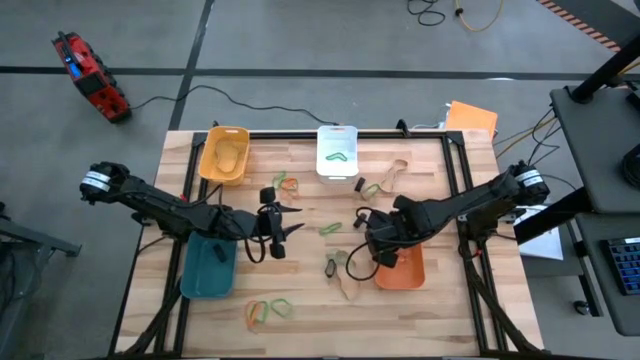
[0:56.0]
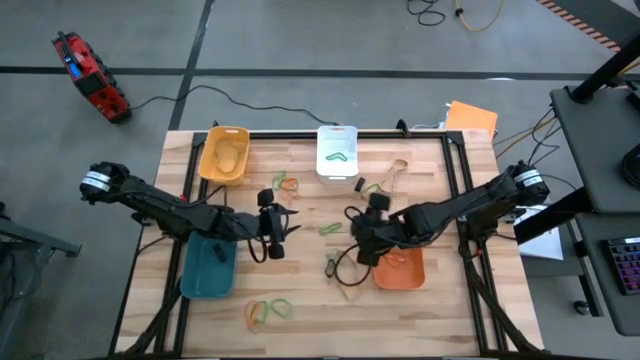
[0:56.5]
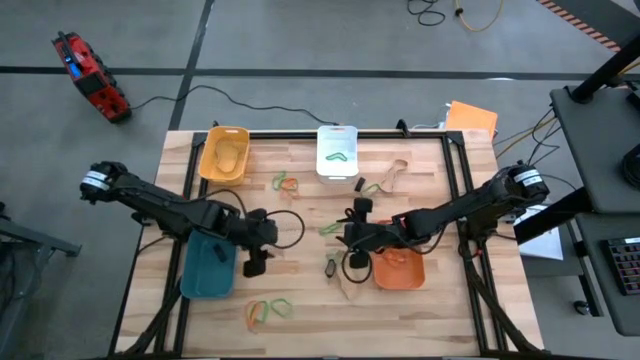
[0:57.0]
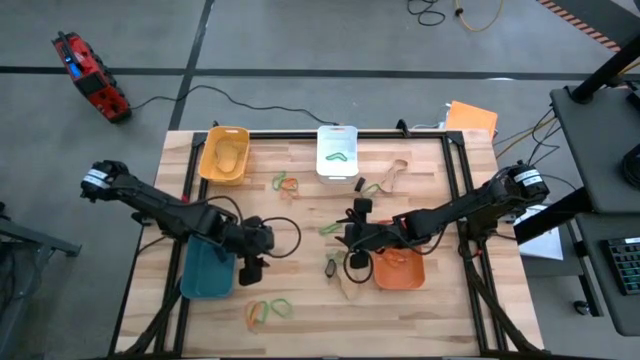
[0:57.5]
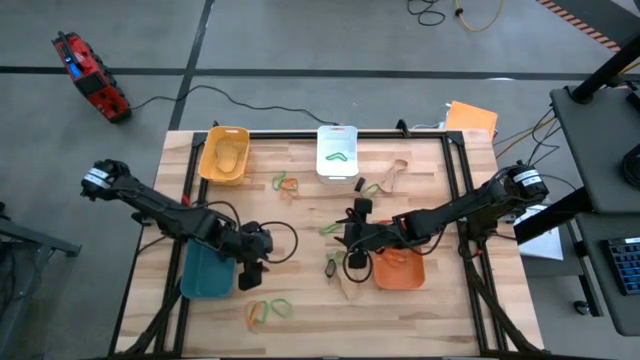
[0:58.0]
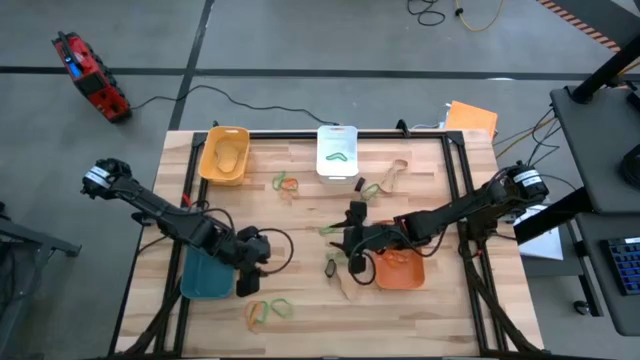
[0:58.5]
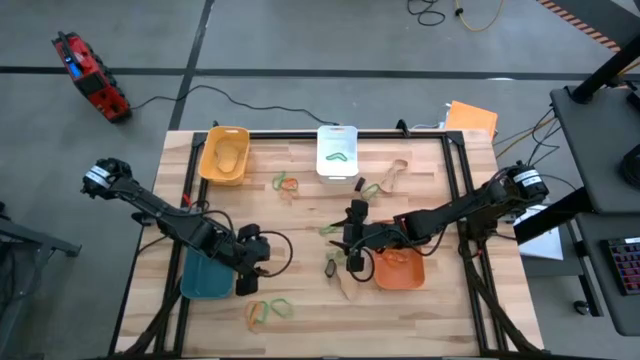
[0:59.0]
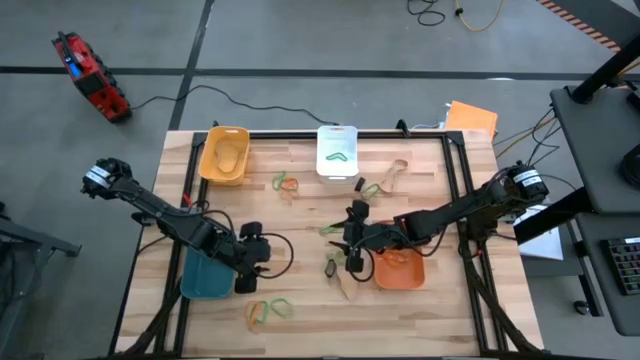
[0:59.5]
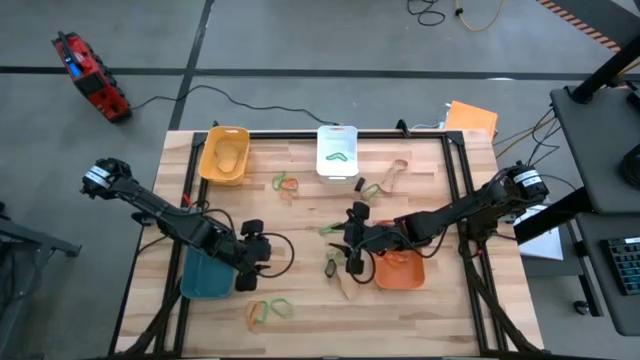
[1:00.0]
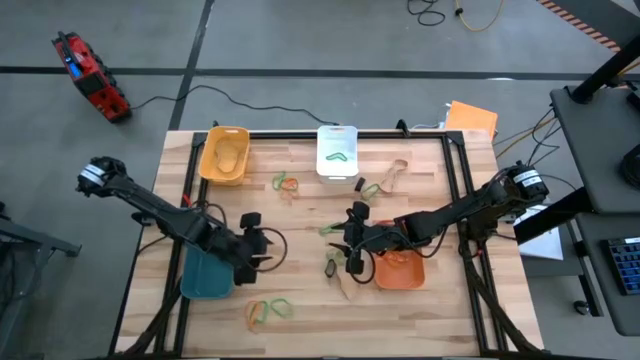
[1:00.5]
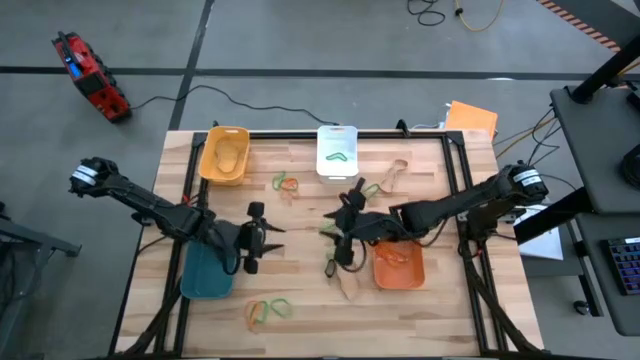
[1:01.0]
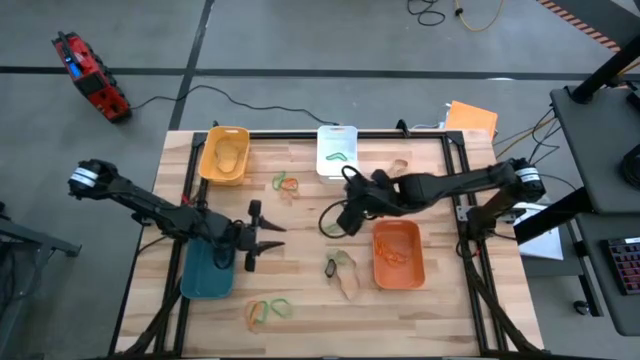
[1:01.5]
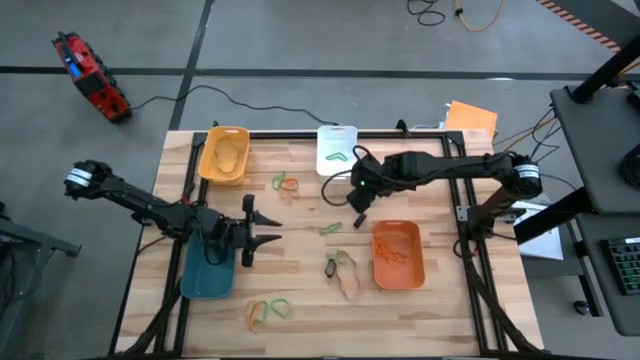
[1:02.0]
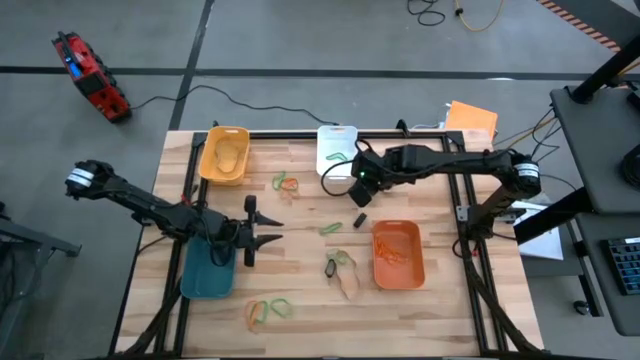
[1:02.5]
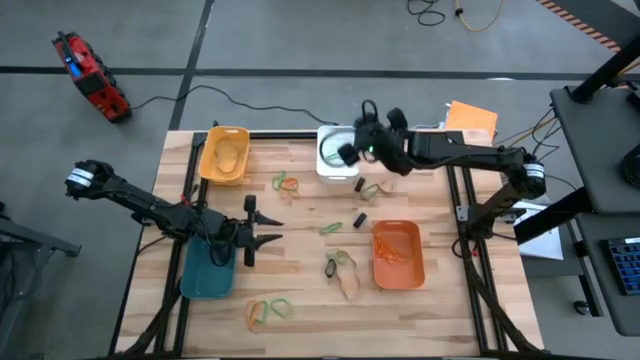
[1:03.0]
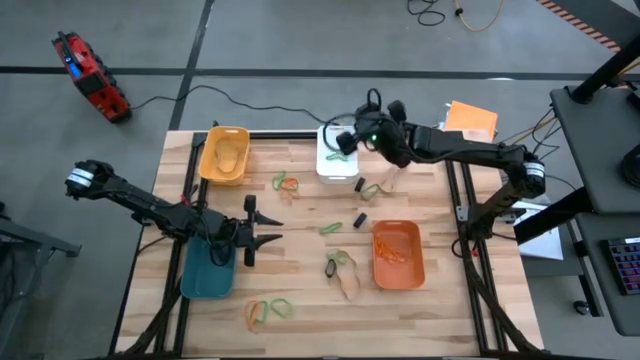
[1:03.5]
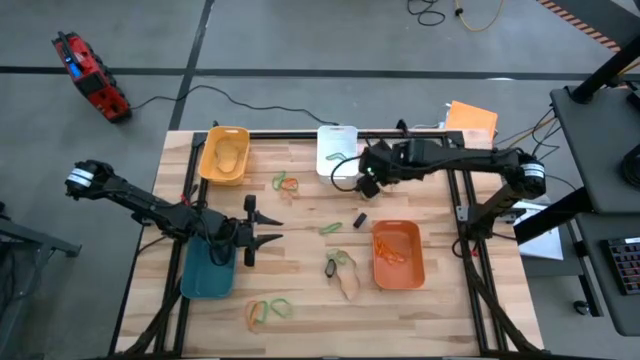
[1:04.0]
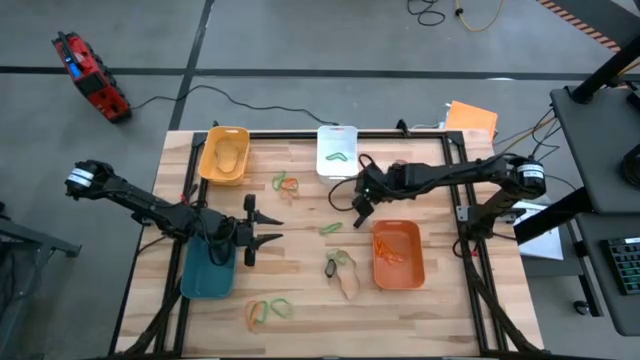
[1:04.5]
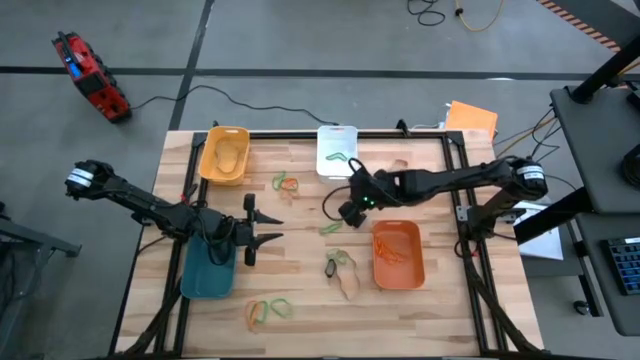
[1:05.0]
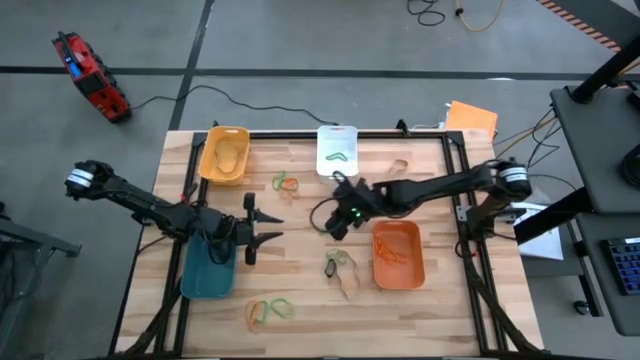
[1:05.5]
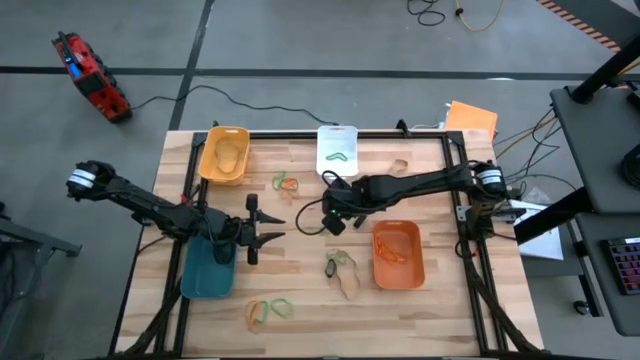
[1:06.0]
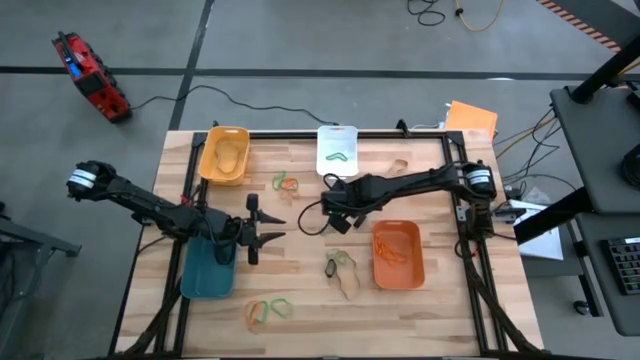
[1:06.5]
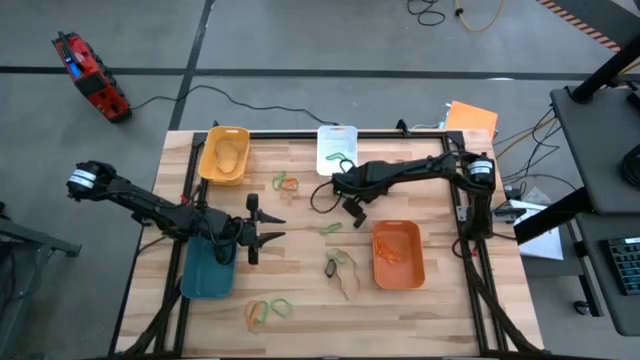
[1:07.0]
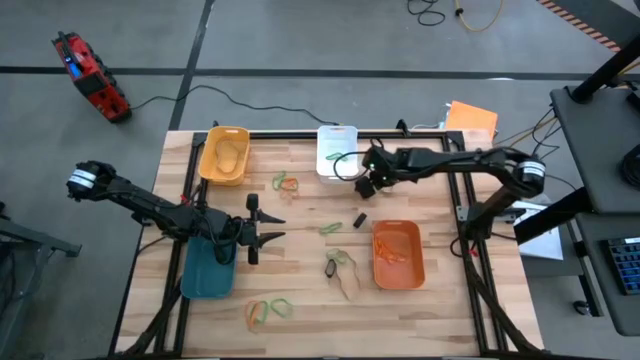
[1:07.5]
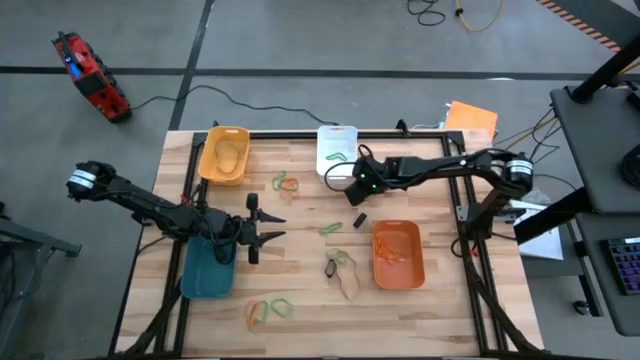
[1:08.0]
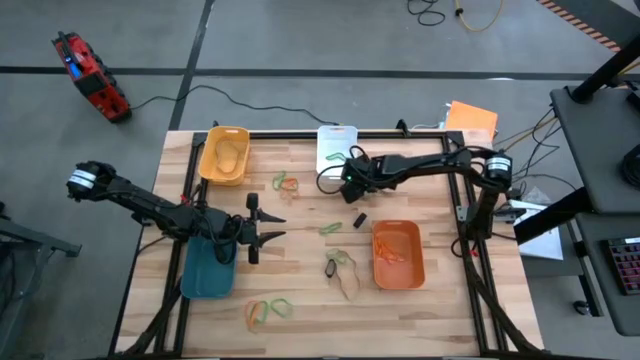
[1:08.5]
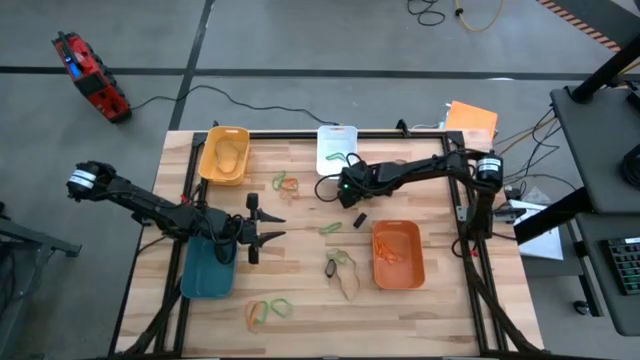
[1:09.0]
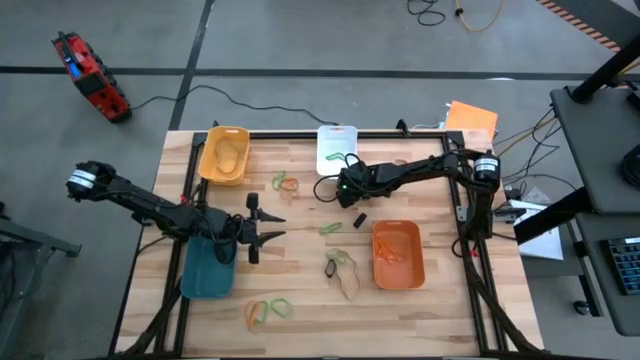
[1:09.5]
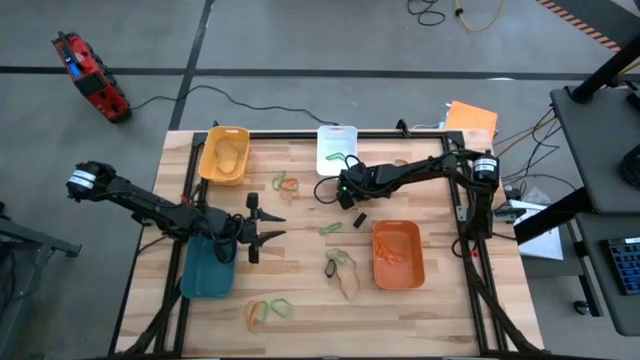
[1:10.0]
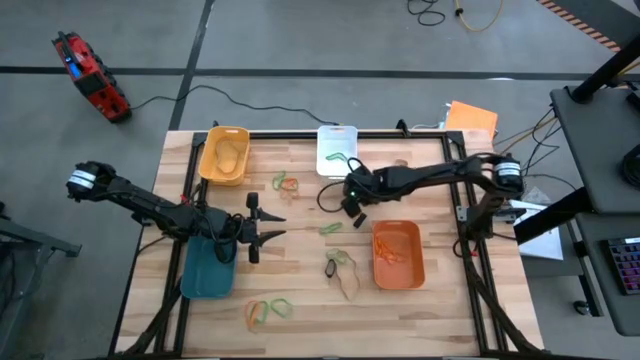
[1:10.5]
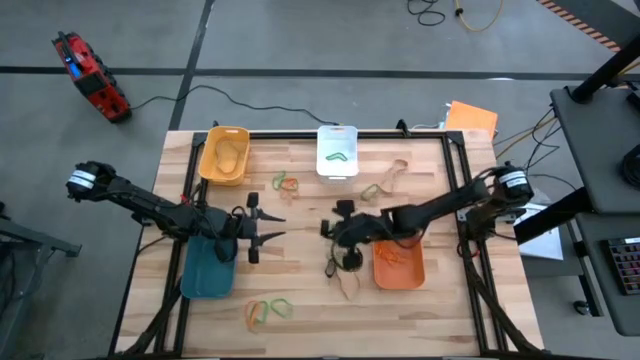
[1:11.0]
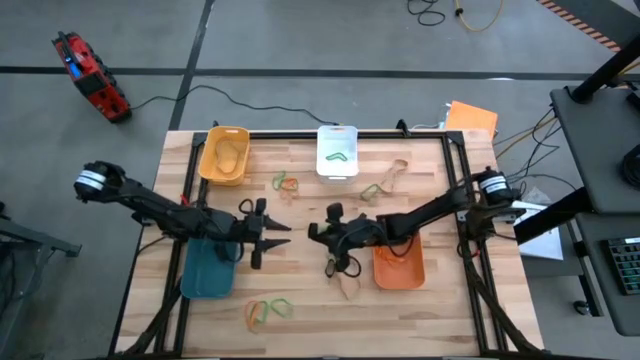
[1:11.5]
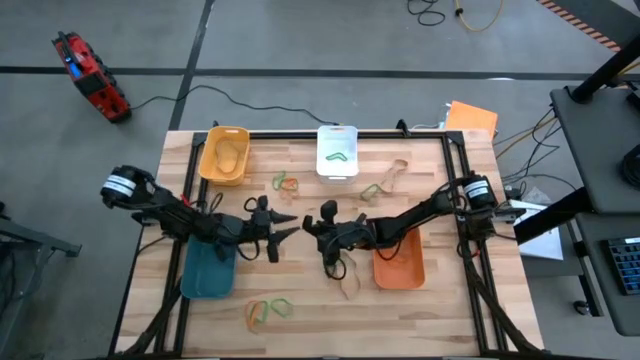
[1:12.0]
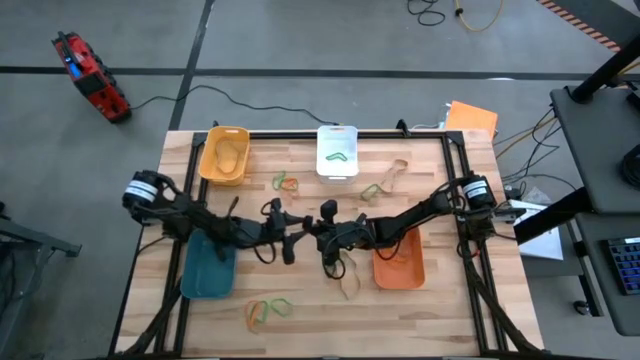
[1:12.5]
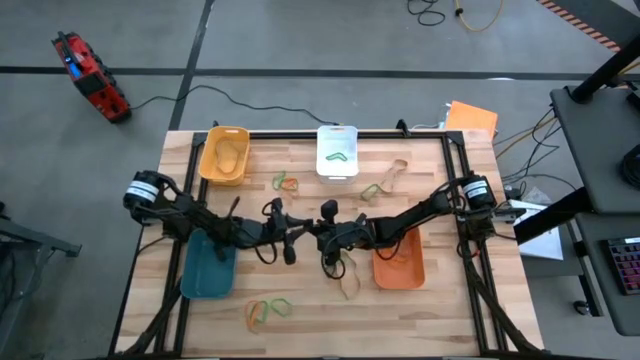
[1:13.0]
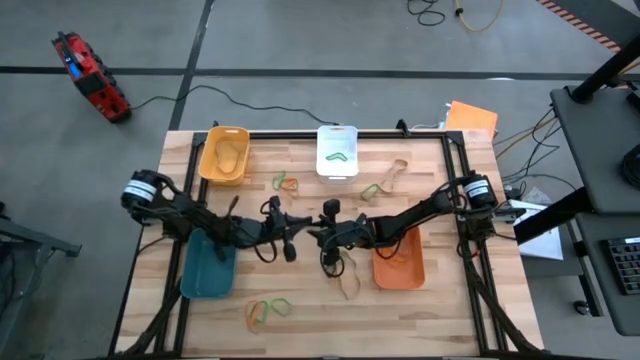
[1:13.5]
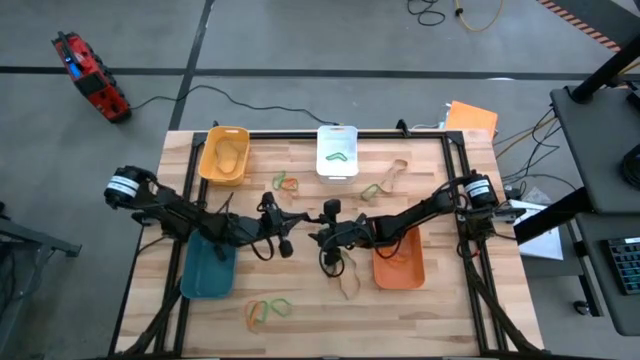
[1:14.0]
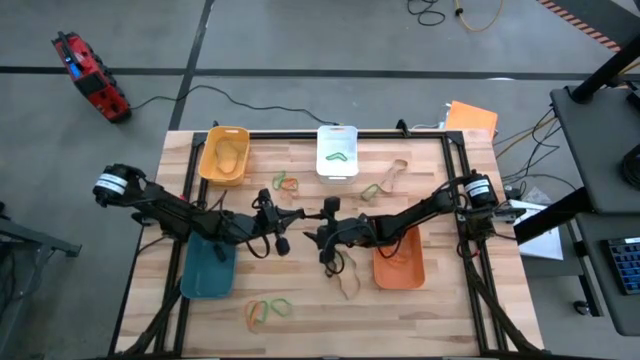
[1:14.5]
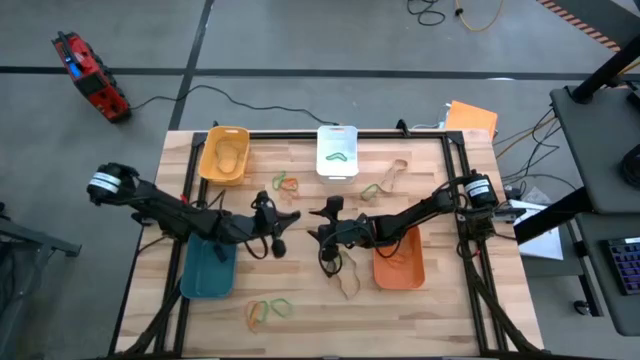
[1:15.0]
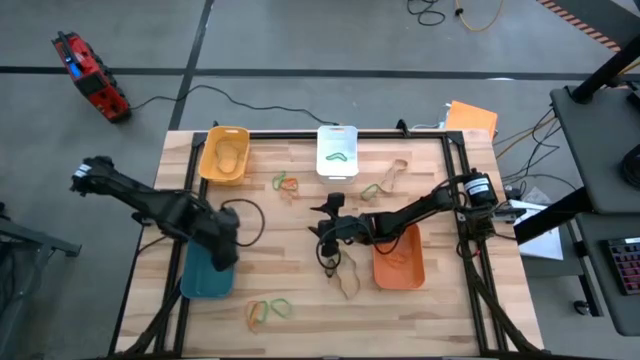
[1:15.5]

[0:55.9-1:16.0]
Task: Sort rubber bands into baskets
Put the rubber band into the blue bin

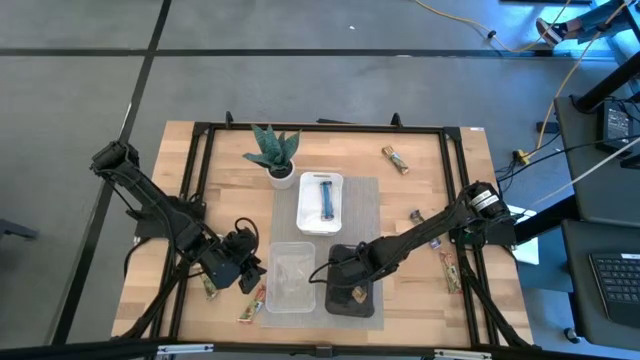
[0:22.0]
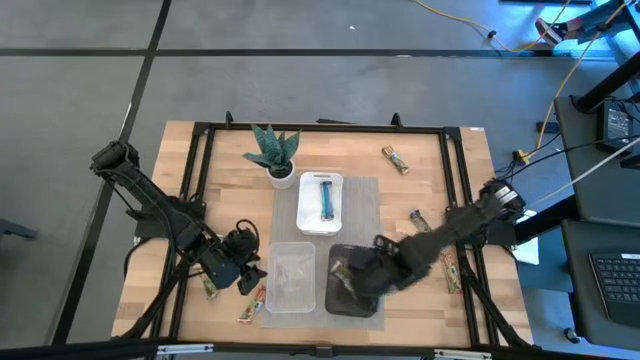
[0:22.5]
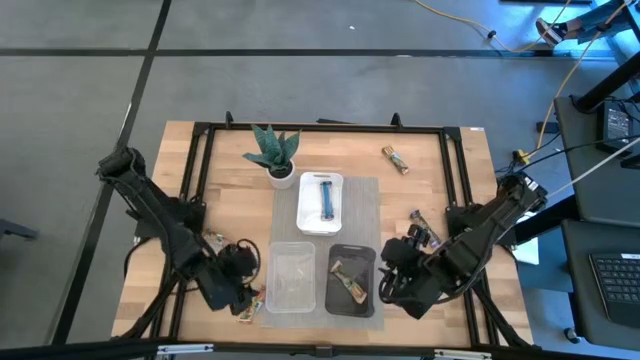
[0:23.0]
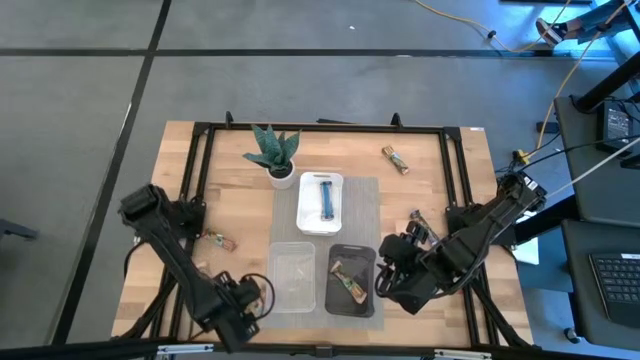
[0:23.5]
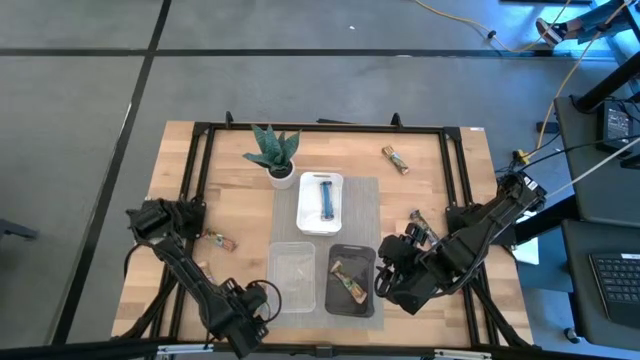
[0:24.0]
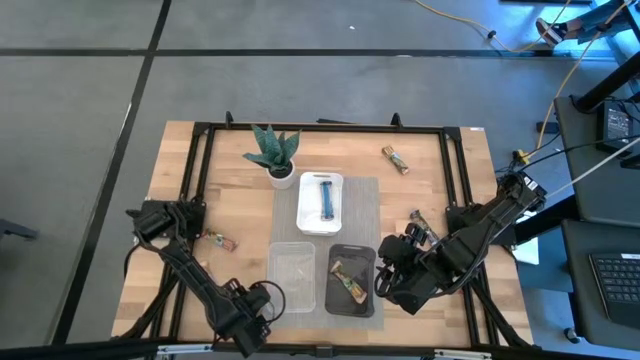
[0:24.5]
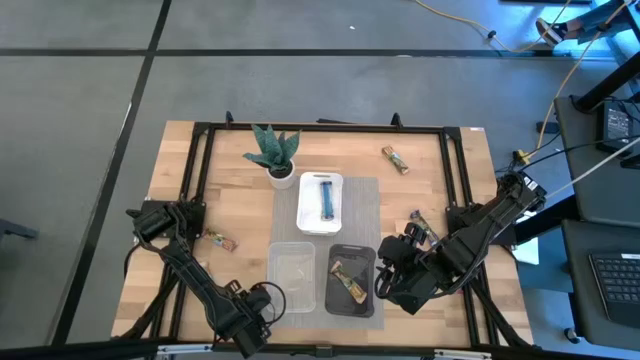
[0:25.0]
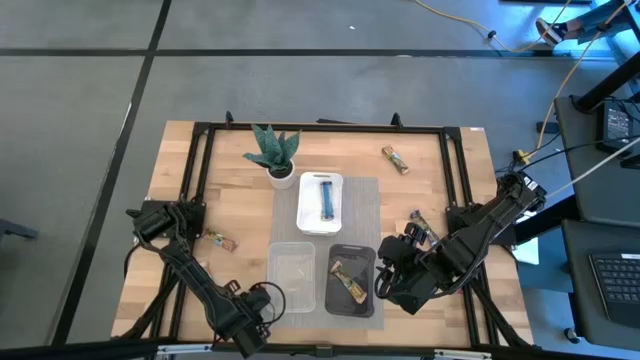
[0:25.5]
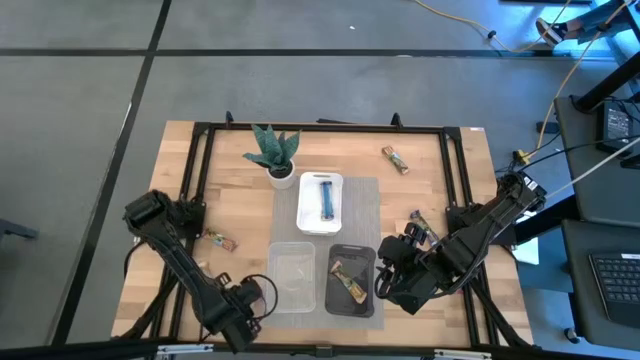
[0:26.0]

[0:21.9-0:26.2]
Task: Pick and place Granola Bars by type
Put the bottom left red granola bar into the transparent bin
